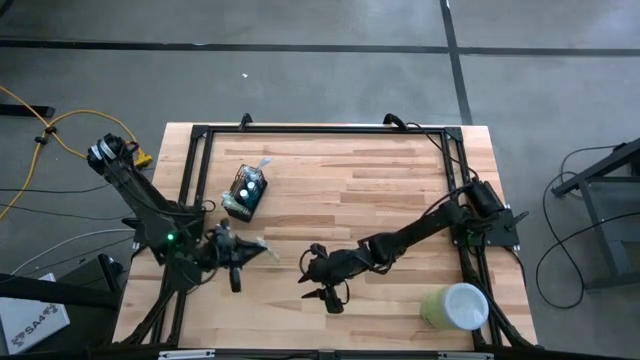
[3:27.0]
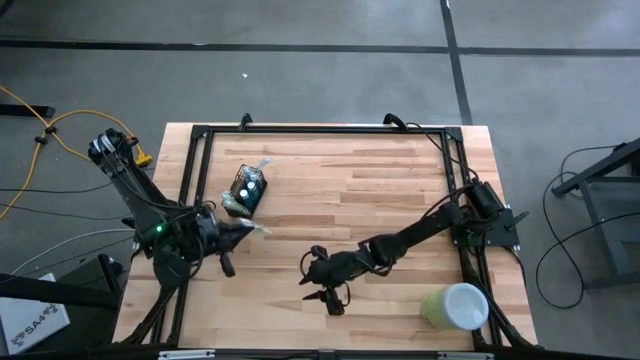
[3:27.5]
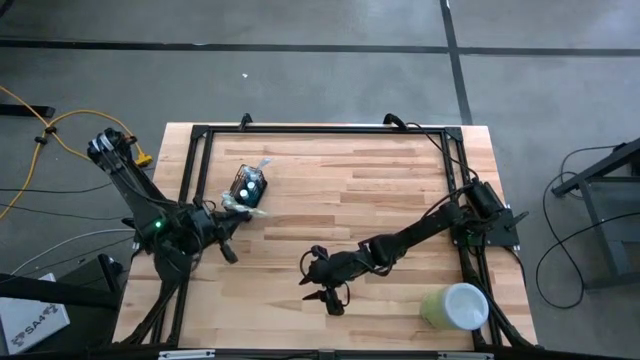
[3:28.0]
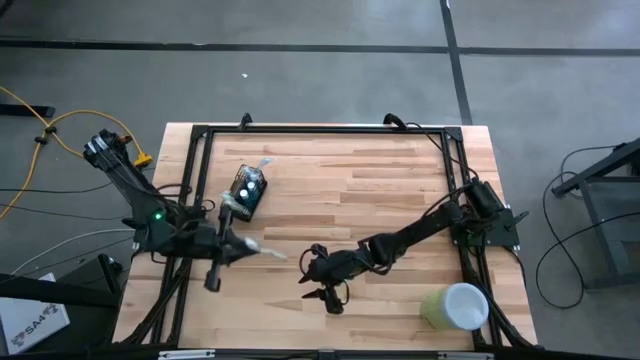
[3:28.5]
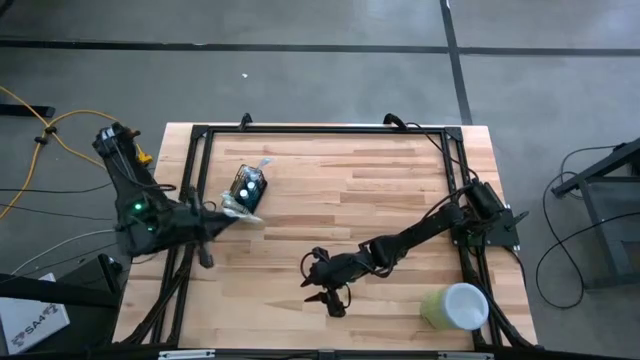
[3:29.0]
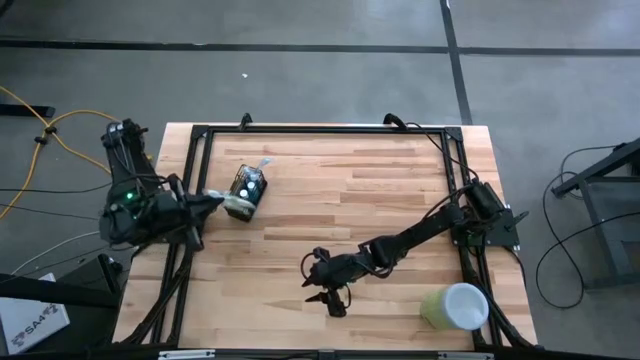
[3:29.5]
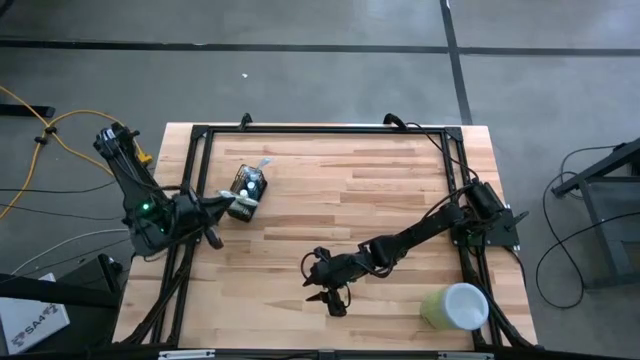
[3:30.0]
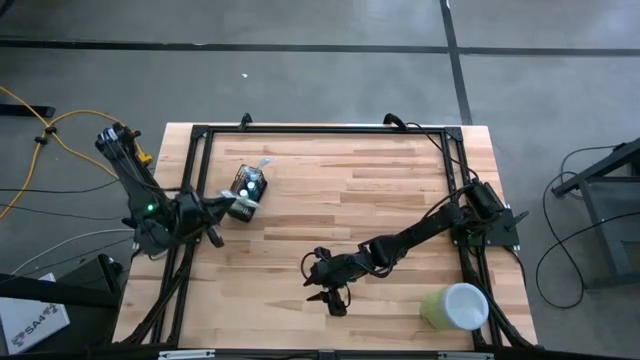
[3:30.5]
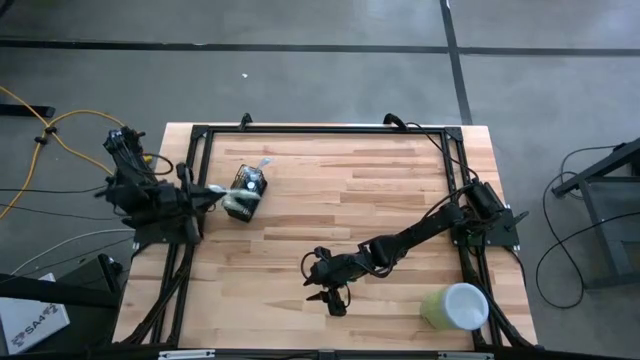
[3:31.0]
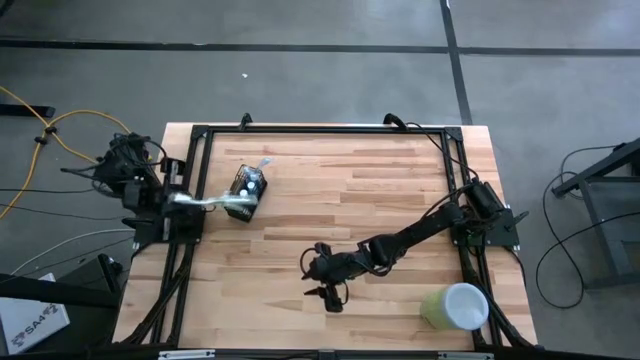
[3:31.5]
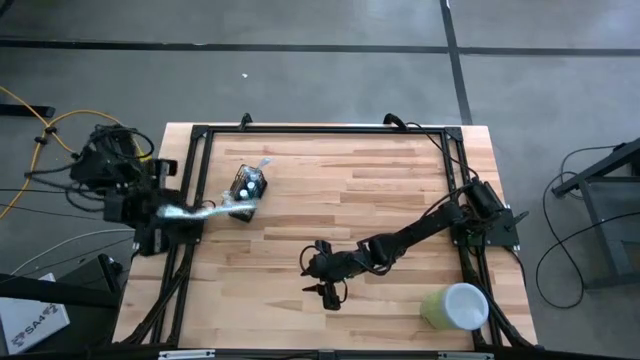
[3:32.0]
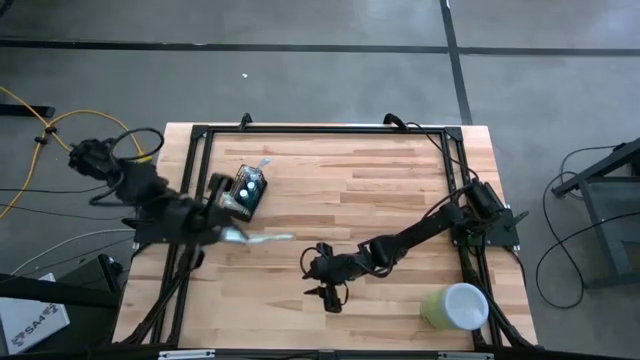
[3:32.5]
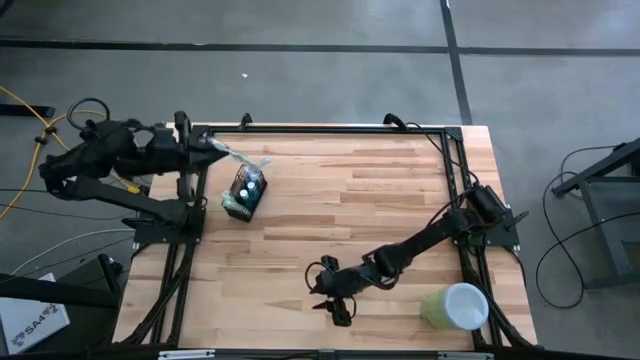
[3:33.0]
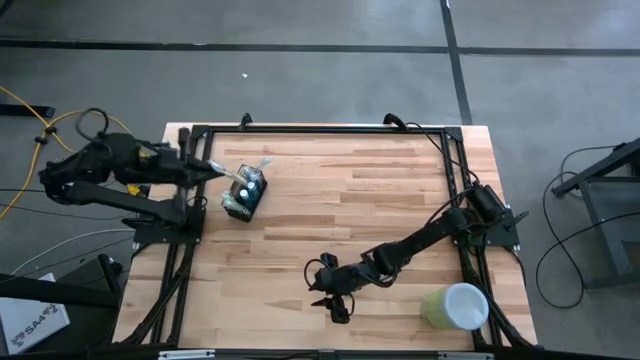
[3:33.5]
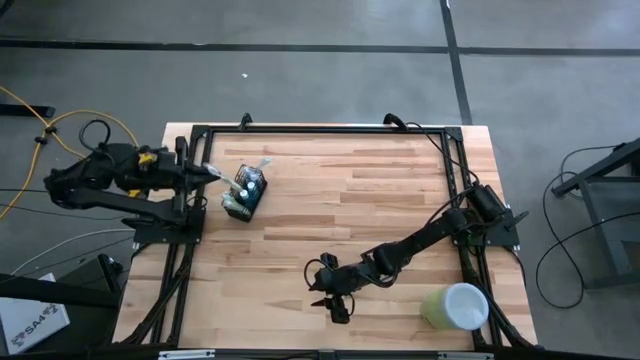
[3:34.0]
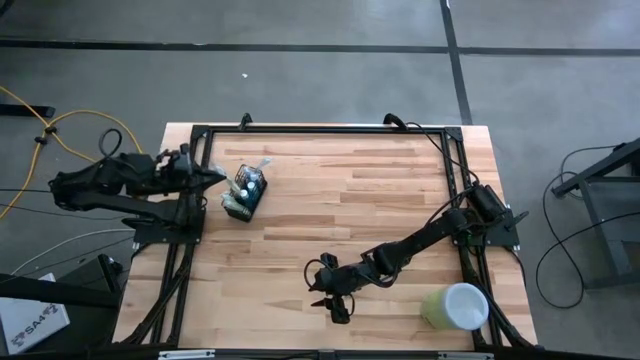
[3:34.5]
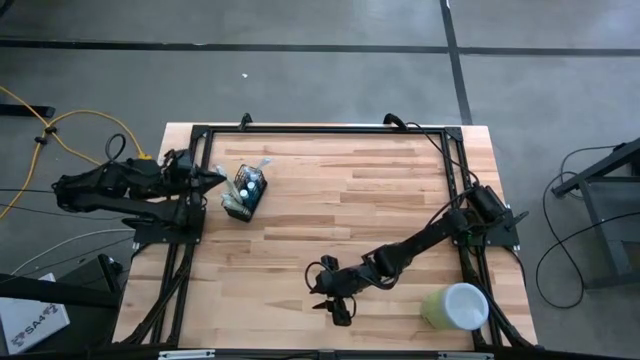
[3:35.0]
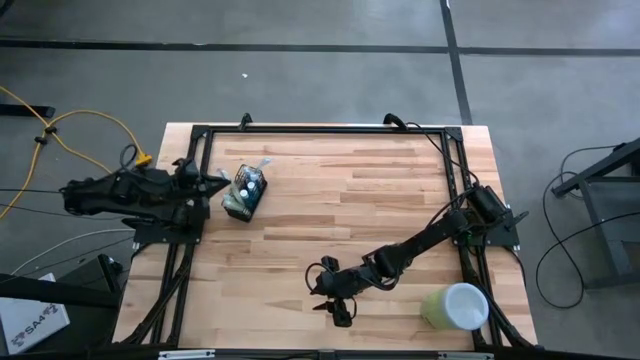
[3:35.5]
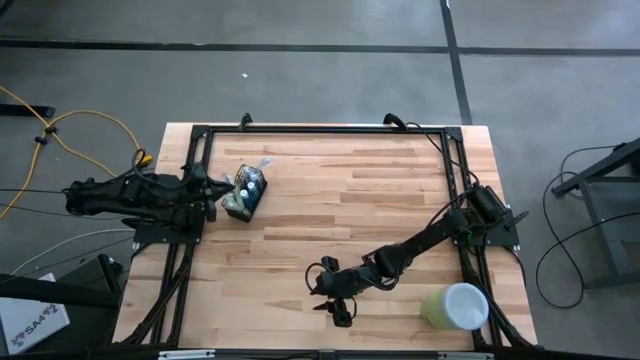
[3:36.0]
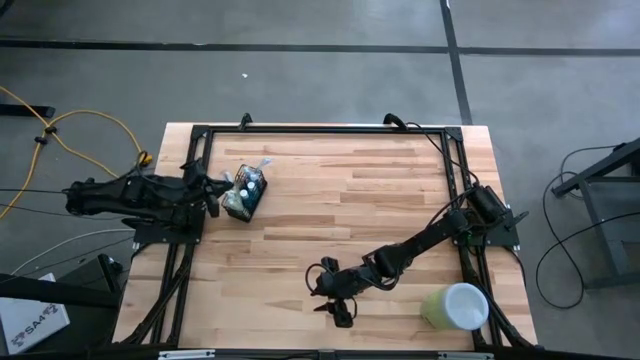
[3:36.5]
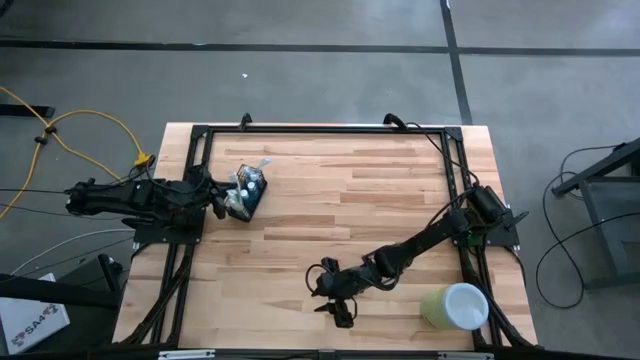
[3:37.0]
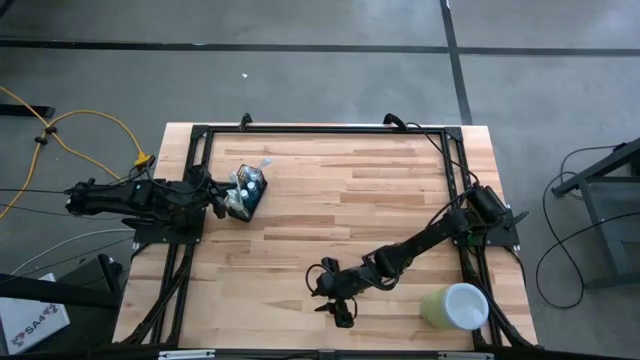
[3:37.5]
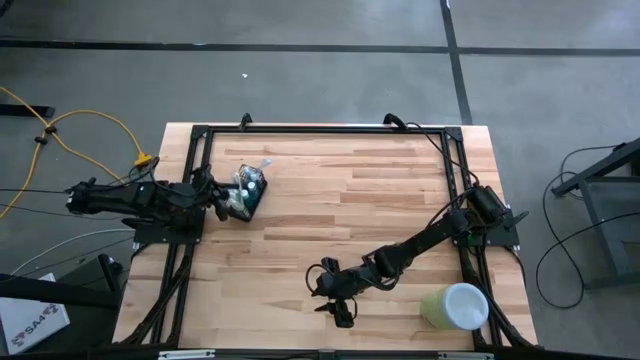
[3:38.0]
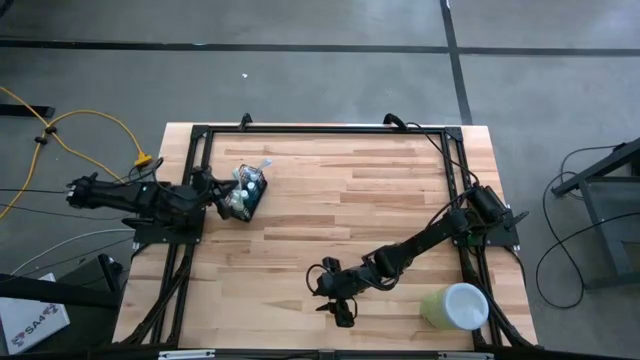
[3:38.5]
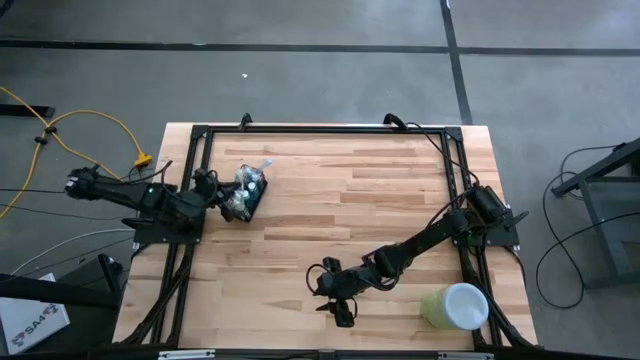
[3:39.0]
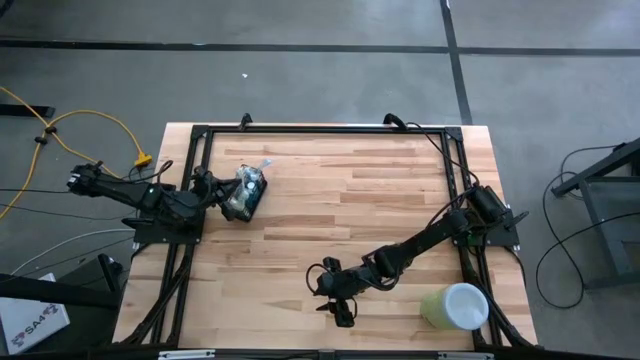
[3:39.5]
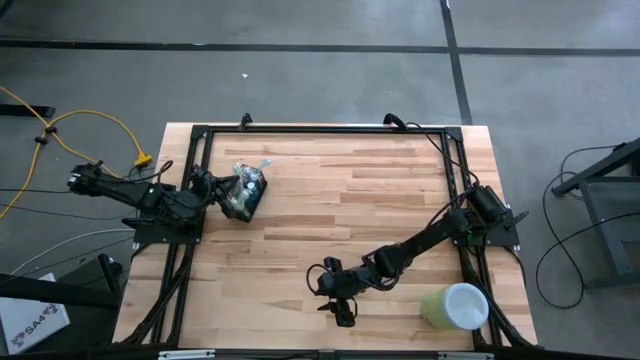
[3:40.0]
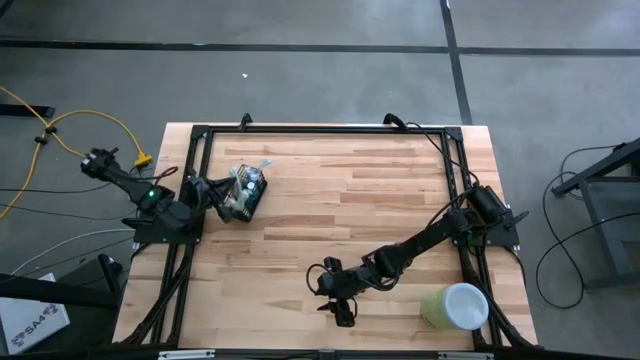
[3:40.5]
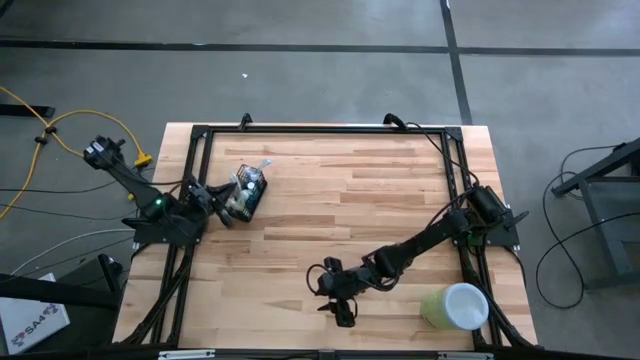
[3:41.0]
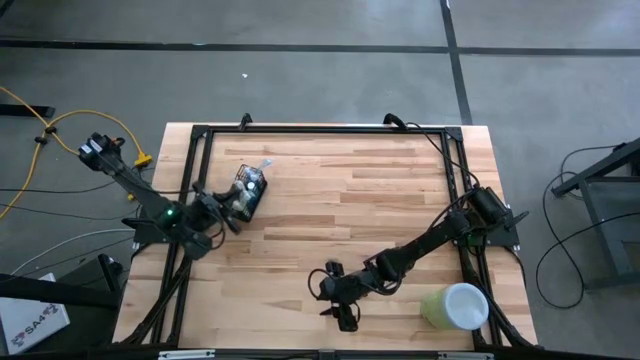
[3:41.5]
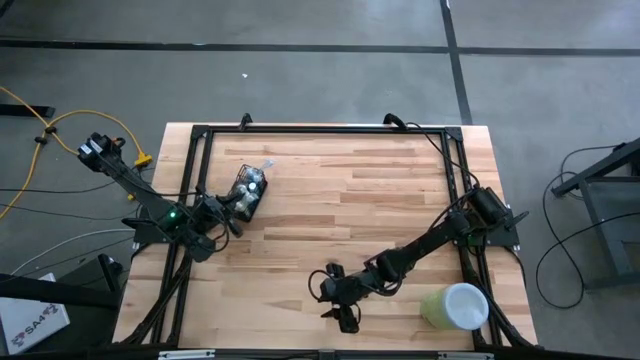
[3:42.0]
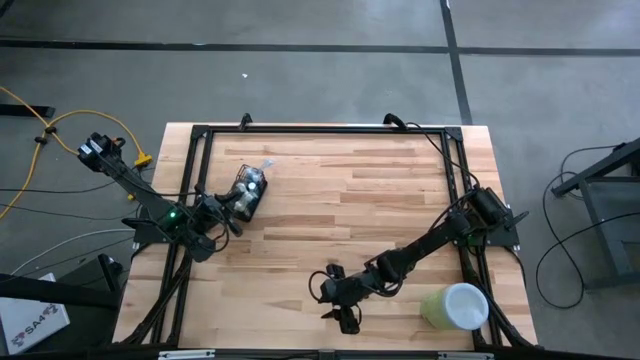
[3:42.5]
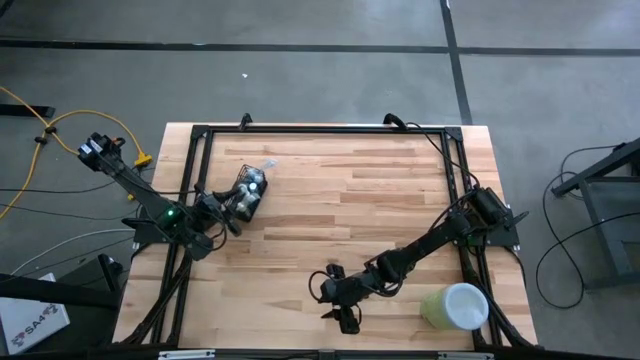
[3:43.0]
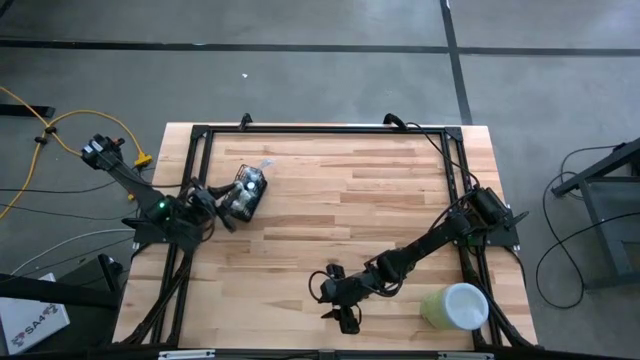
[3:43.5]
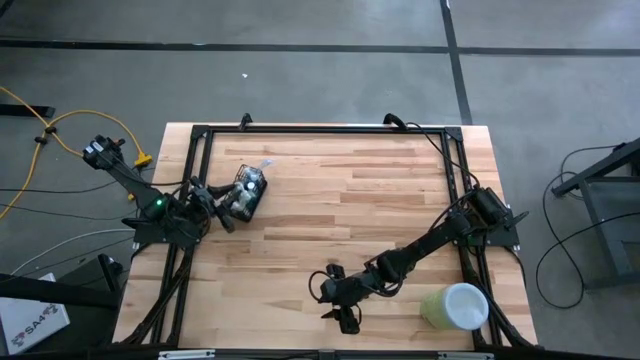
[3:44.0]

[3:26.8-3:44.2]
Task: Pick & Place toothbrushing station
Put the green toothbrush into the black wire organizer

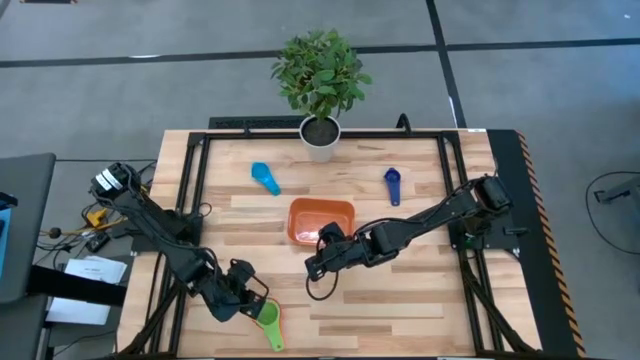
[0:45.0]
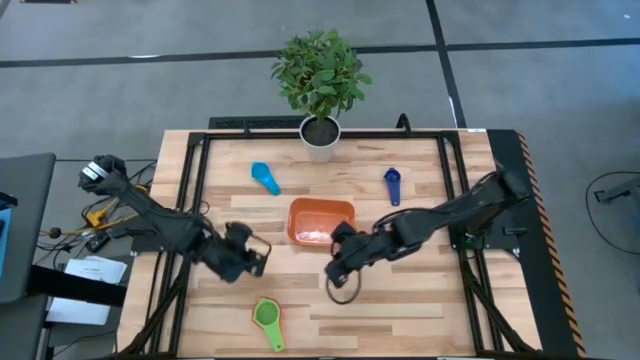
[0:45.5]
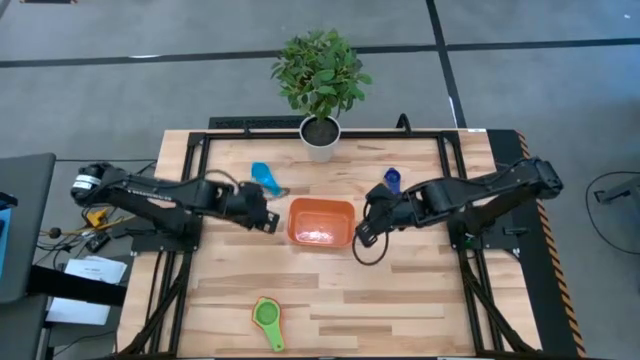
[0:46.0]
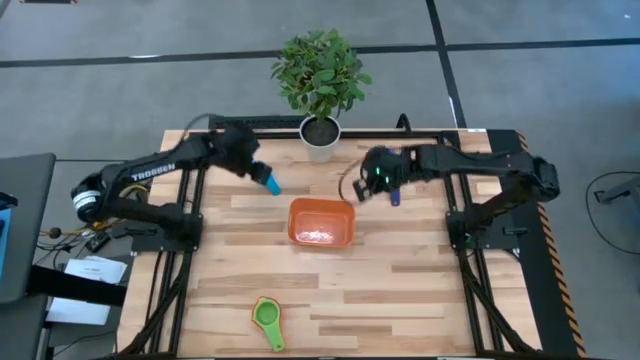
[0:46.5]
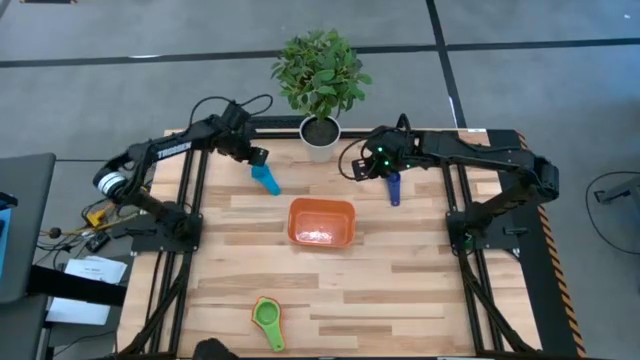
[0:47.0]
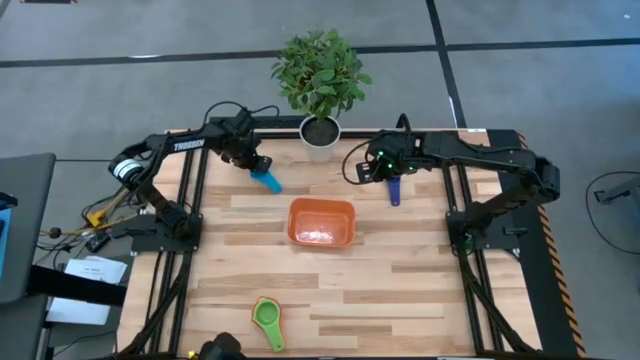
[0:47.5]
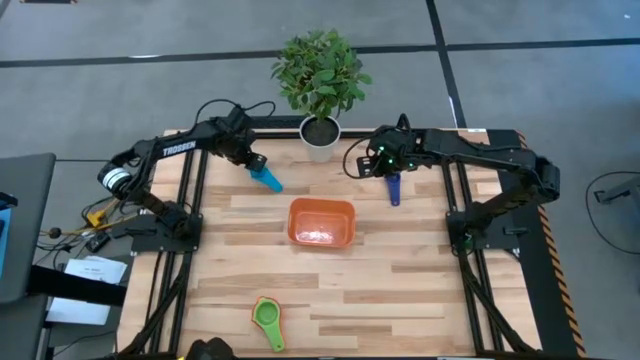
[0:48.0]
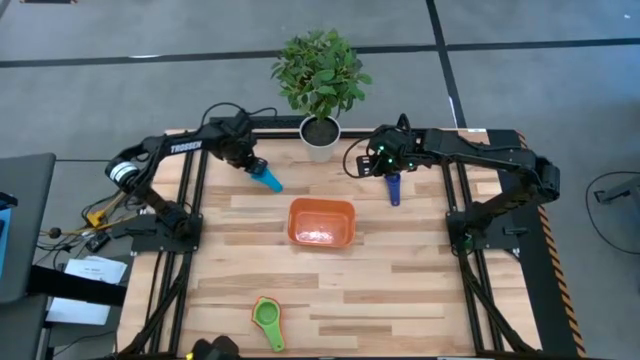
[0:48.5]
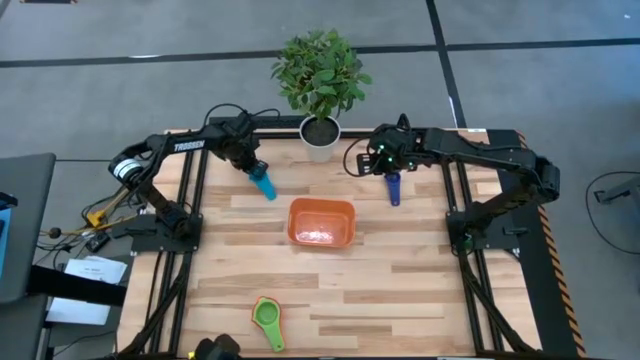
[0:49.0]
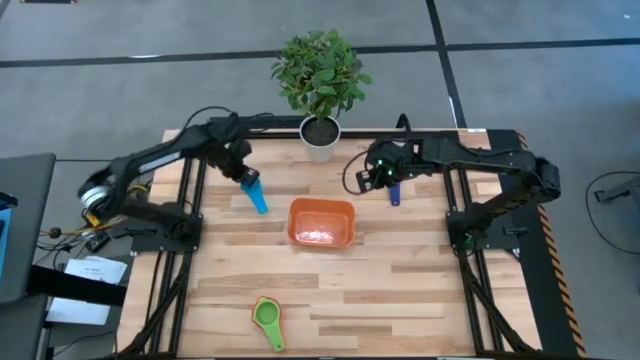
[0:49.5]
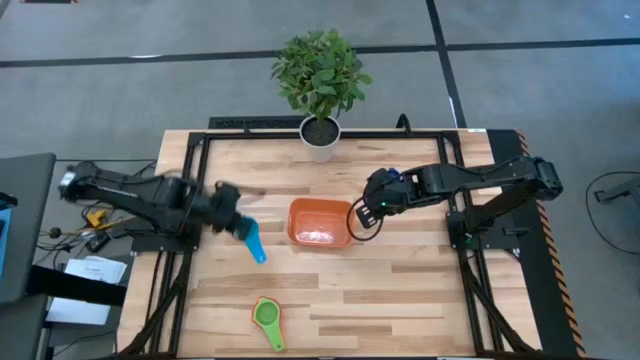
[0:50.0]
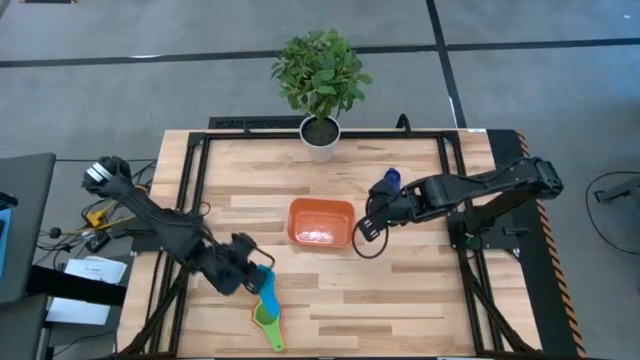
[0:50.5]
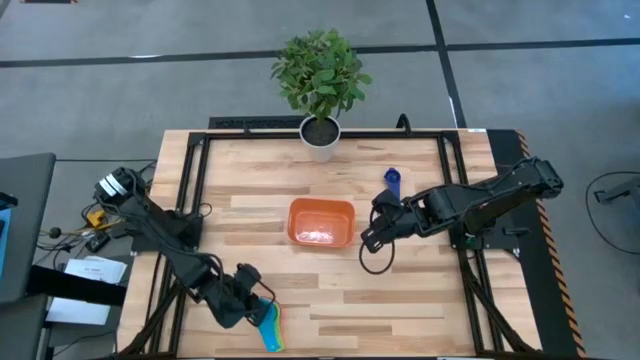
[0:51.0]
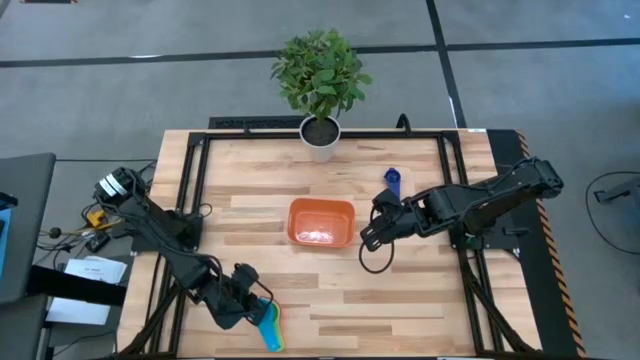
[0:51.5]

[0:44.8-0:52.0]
Task: Nest measuring cups in basket
Stack the light blue measuring cup on top of the green measuring cup
